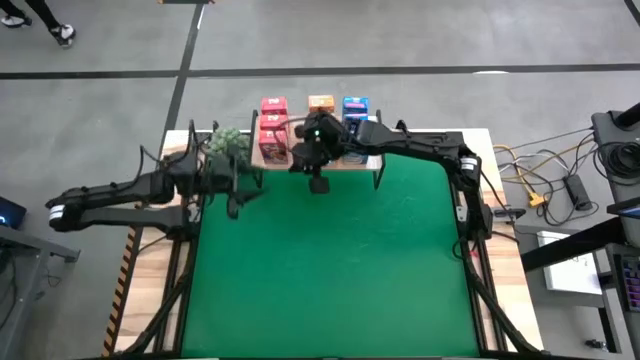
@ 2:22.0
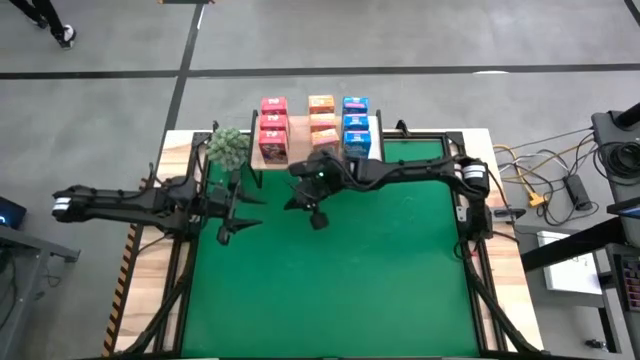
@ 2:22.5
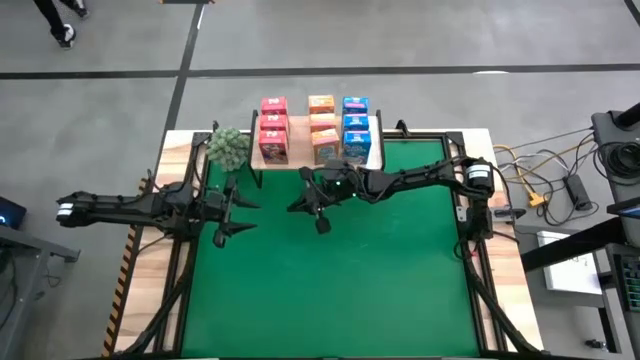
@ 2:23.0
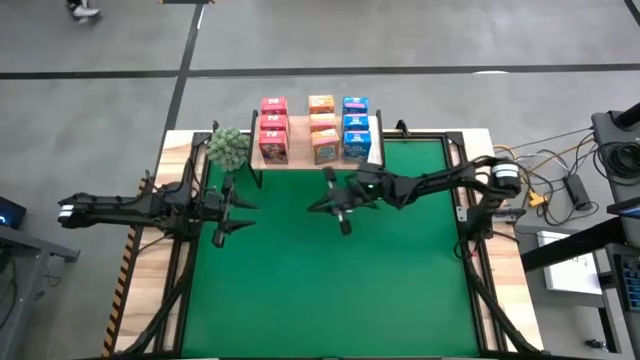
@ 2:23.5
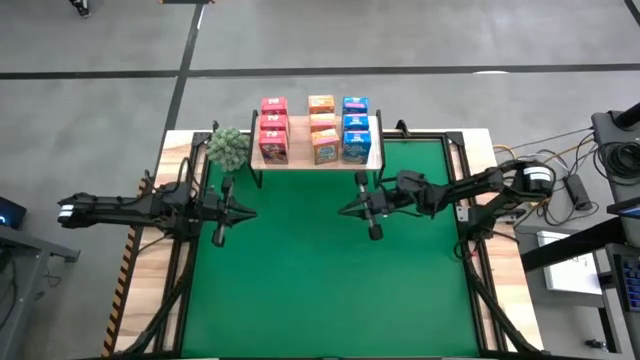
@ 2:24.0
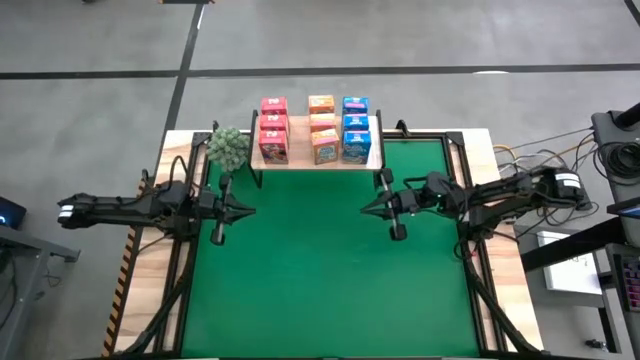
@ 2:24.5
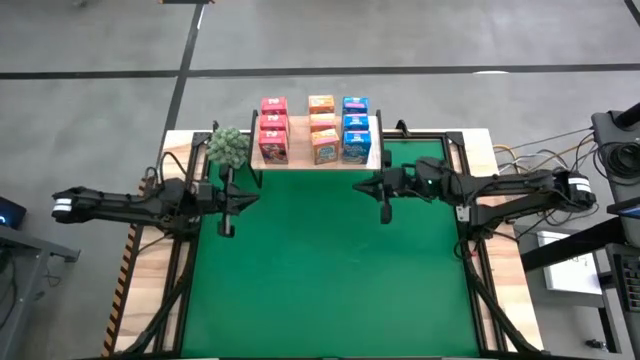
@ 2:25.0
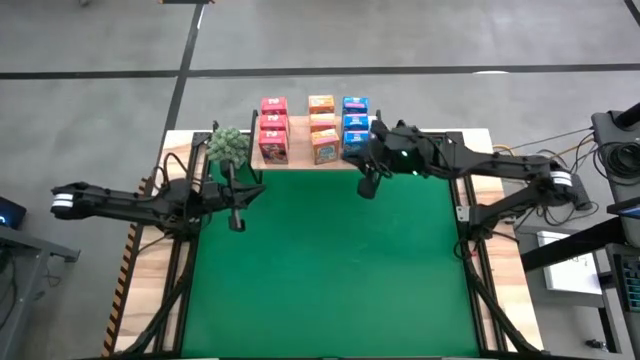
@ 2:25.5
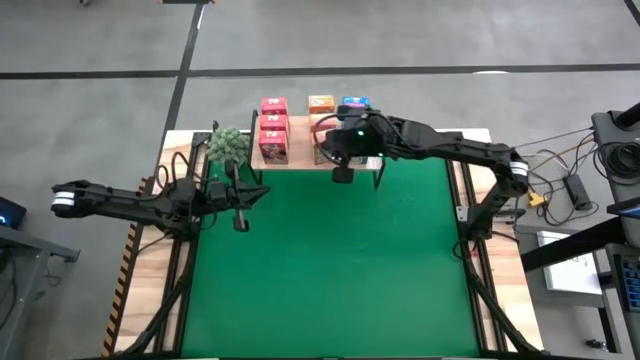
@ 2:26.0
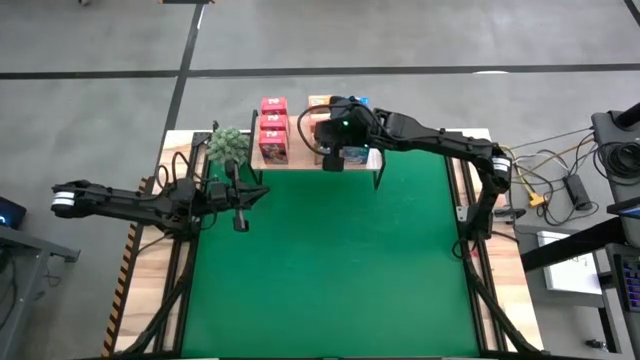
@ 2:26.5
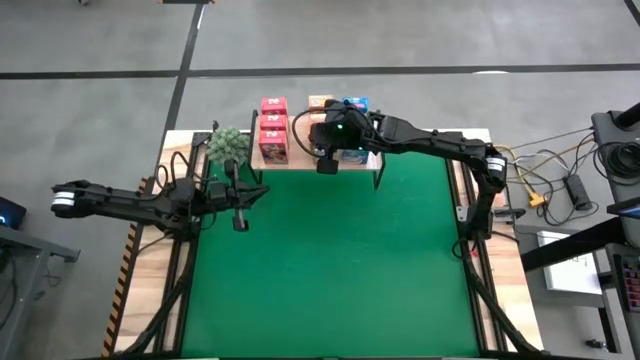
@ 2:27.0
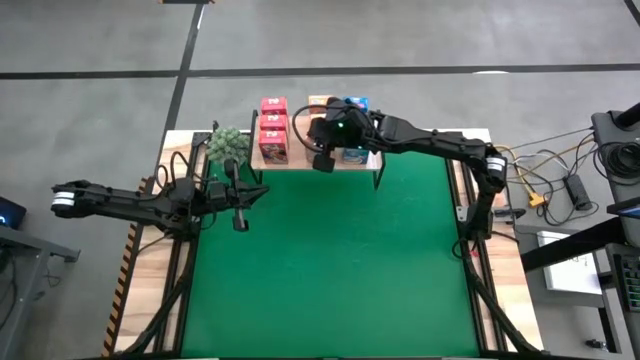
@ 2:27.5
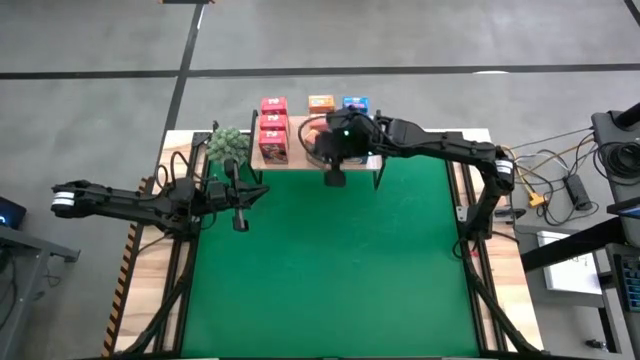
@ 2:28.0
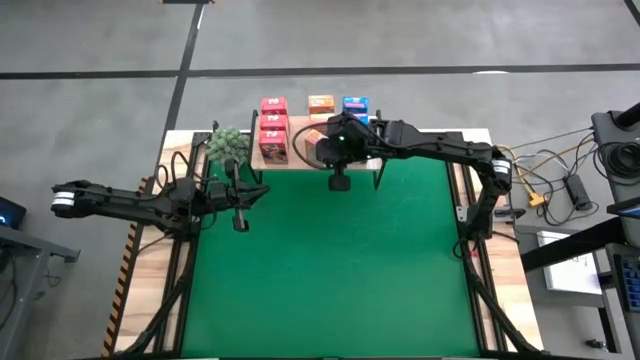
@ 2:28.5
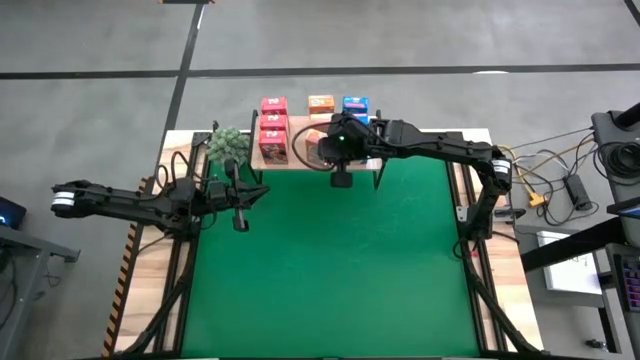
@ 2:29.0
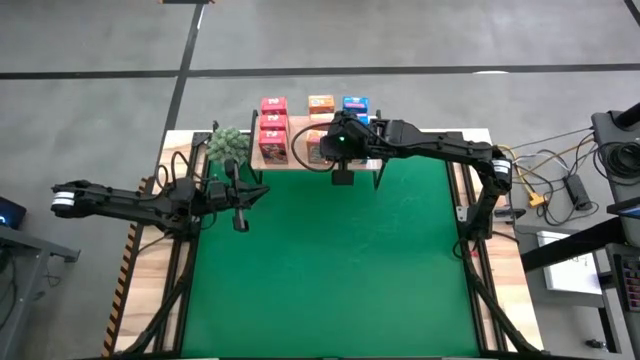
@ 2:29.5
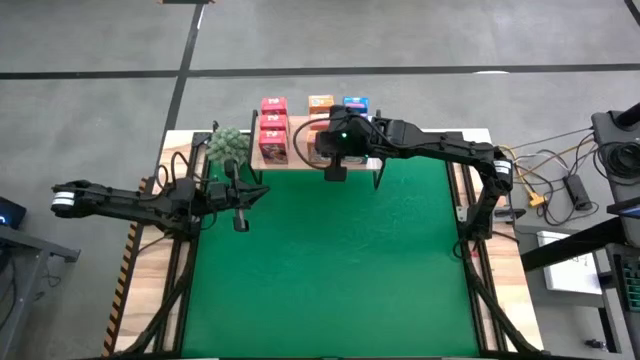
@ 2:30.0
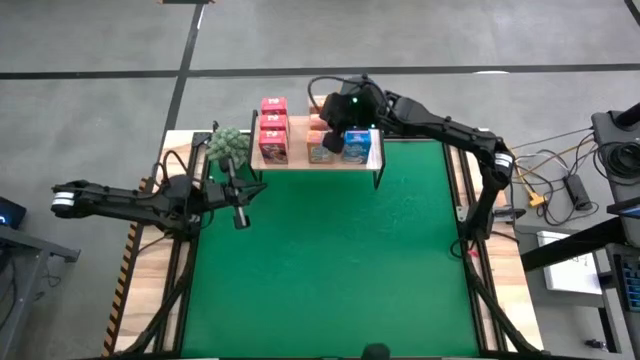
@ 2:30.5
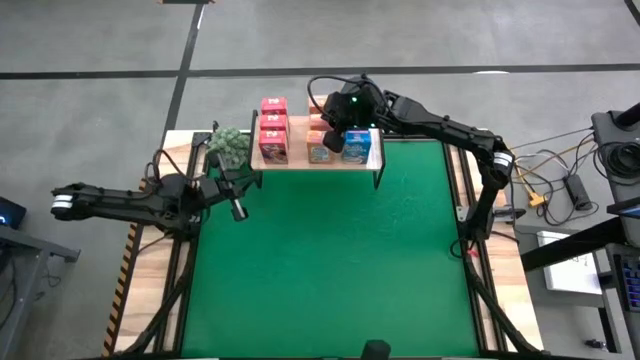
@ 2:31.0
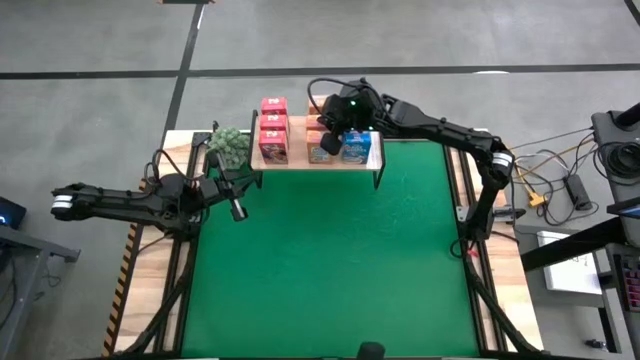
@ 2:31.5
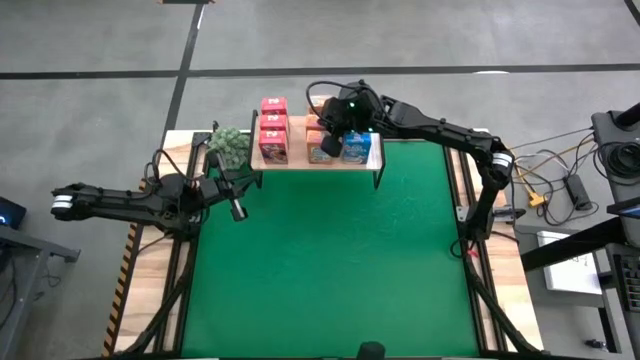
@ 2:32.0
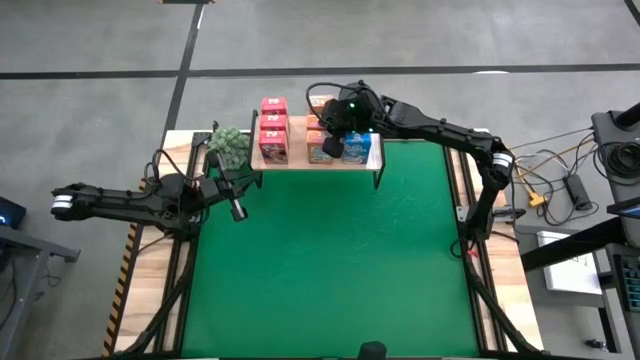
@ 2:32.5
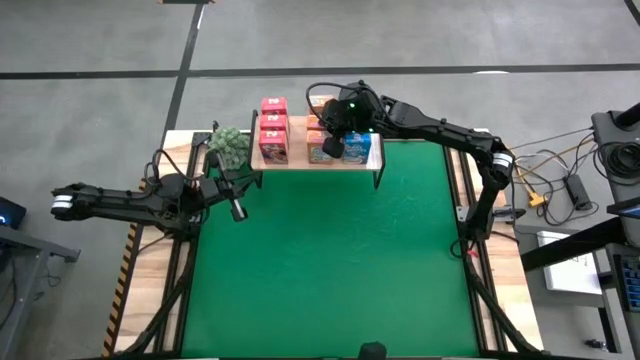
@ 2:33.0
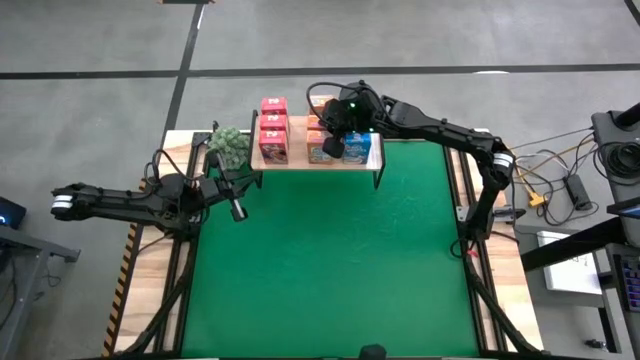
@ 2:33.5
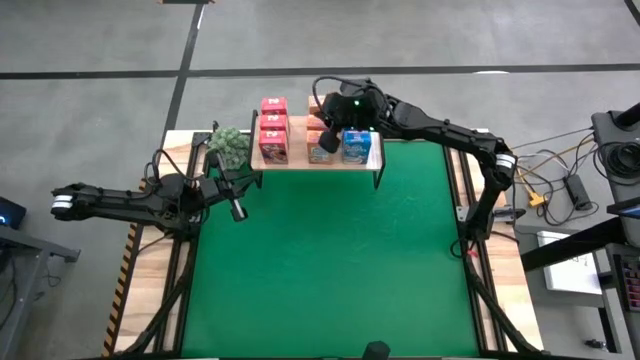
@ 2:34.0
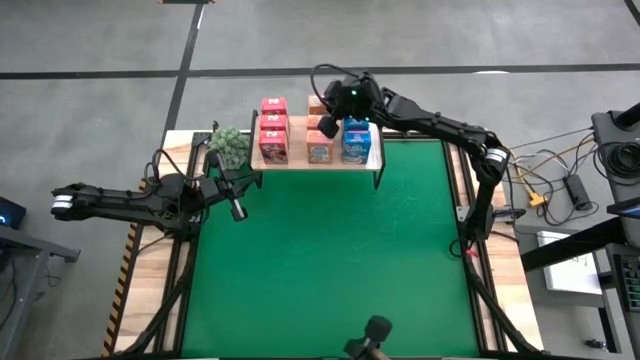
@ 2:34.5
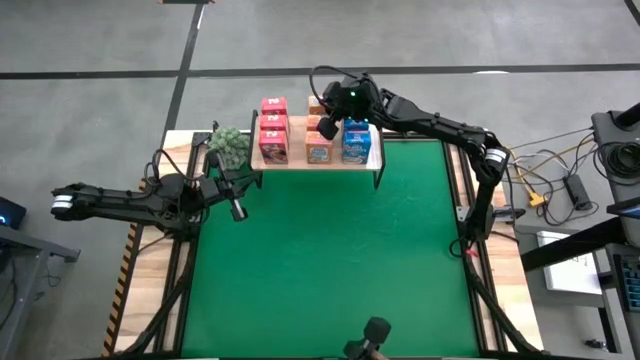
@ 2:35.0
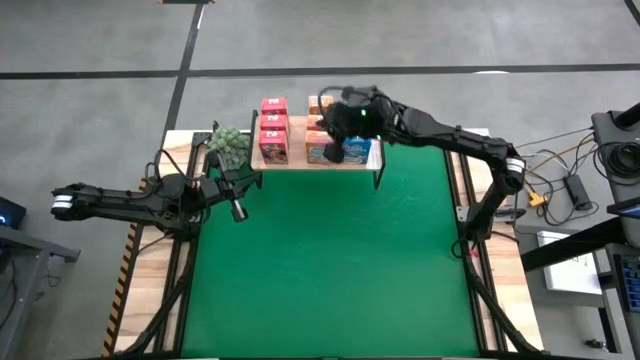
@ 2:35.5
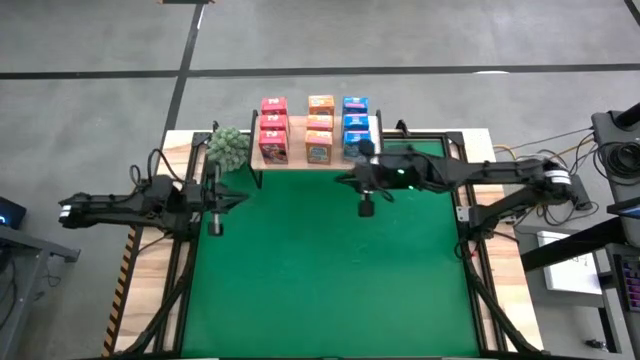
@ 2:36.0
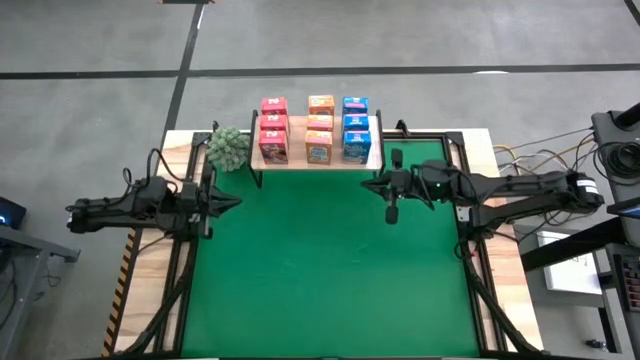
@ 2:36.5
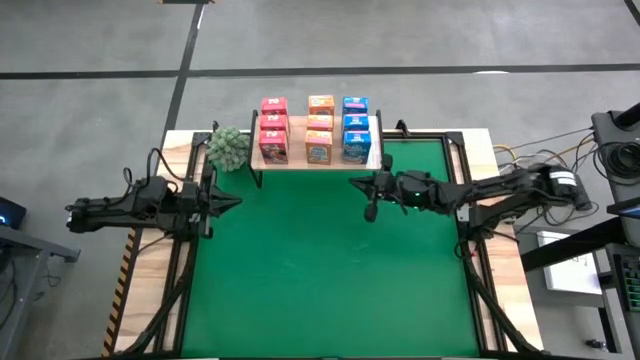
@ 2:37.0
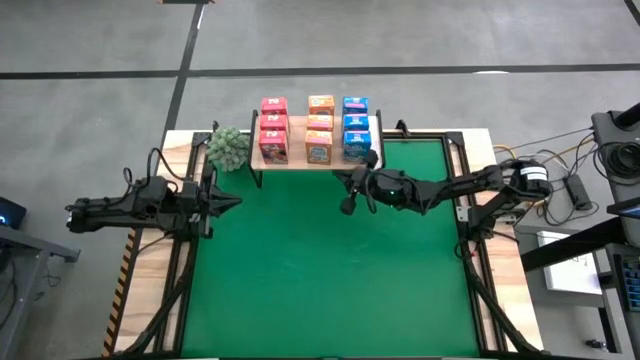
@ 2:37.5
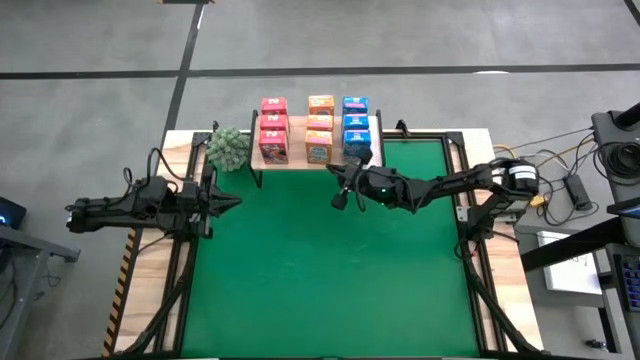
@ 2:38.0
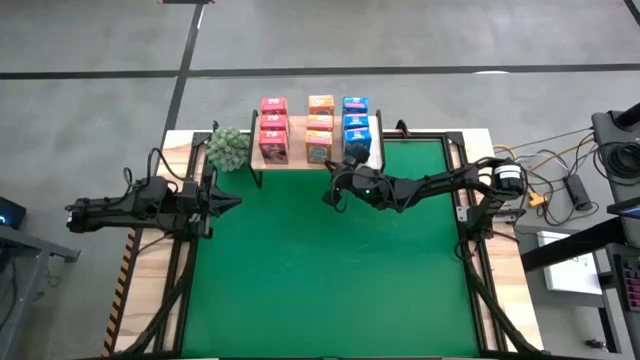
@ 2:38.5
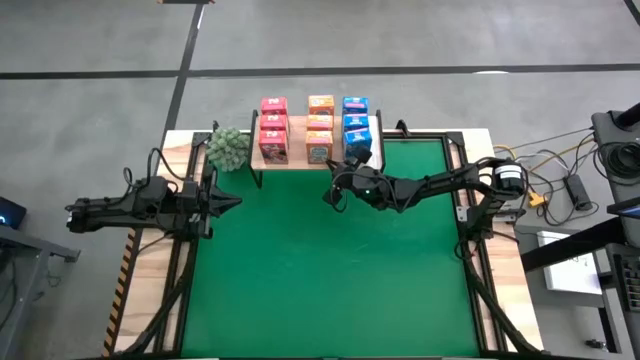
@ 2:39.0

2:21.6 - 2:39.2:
Task: Stack cereal on shelf
Adjust the orange cereal boxes on the shelf

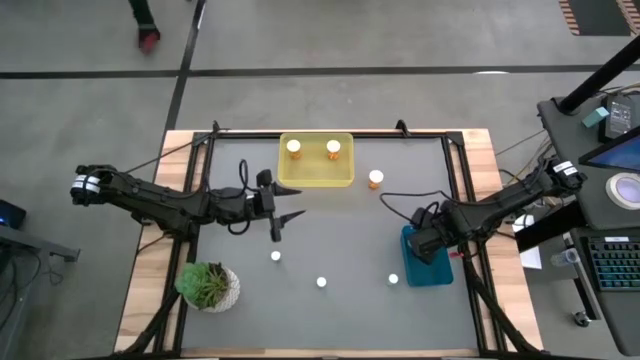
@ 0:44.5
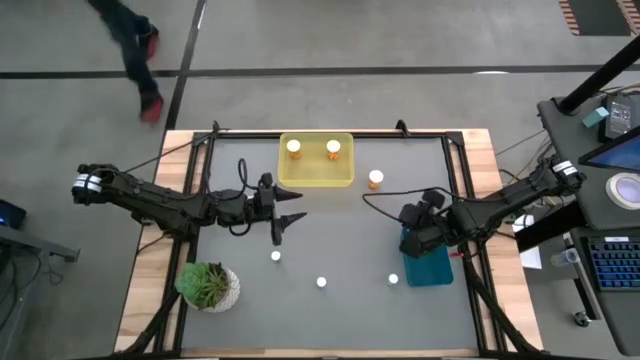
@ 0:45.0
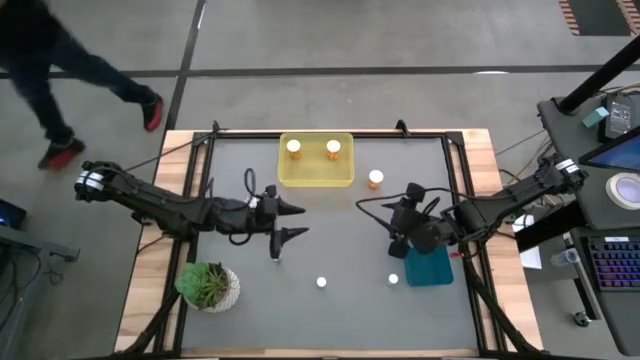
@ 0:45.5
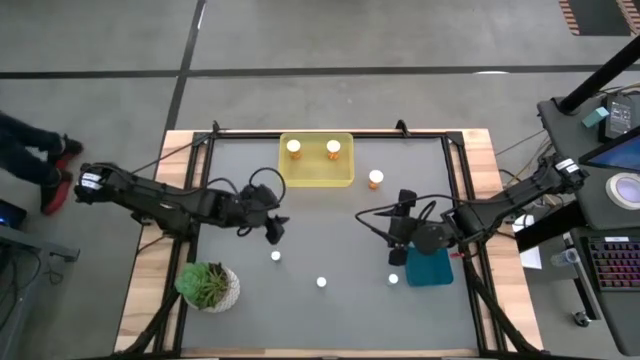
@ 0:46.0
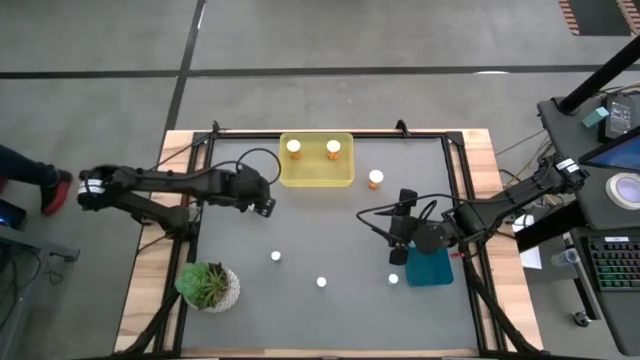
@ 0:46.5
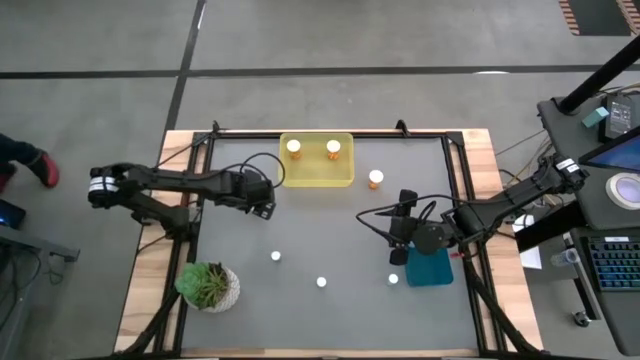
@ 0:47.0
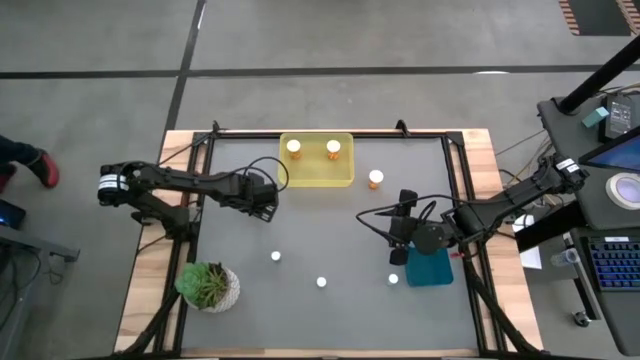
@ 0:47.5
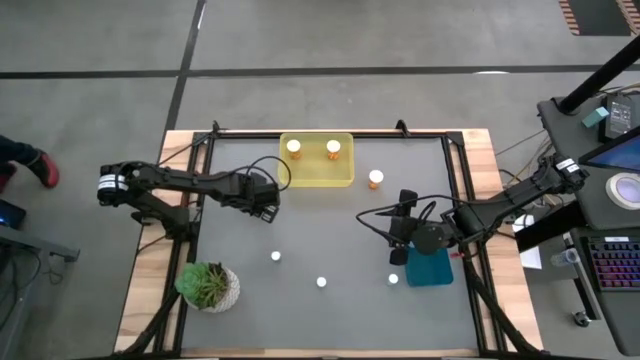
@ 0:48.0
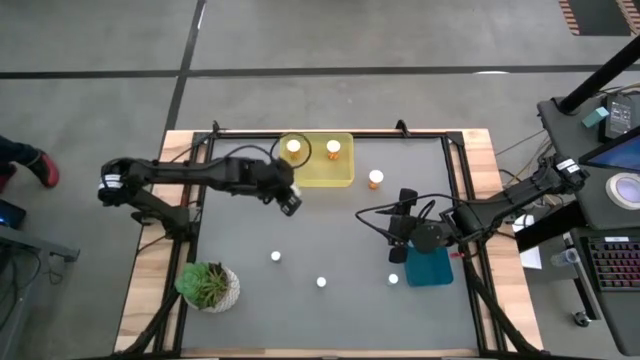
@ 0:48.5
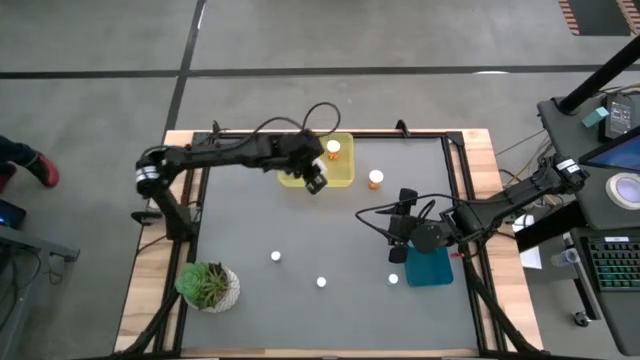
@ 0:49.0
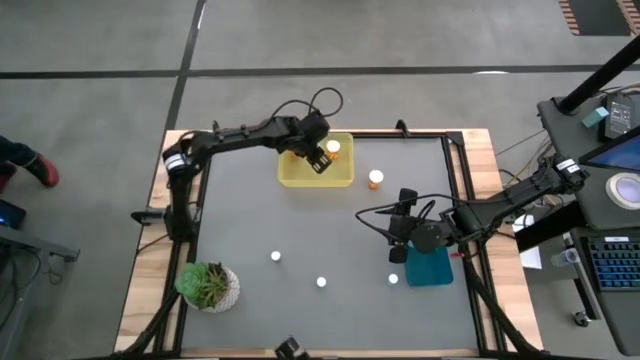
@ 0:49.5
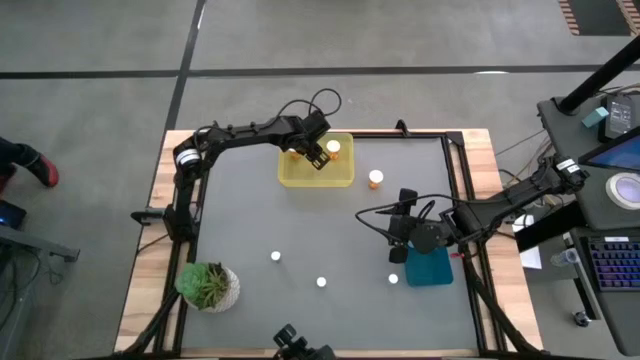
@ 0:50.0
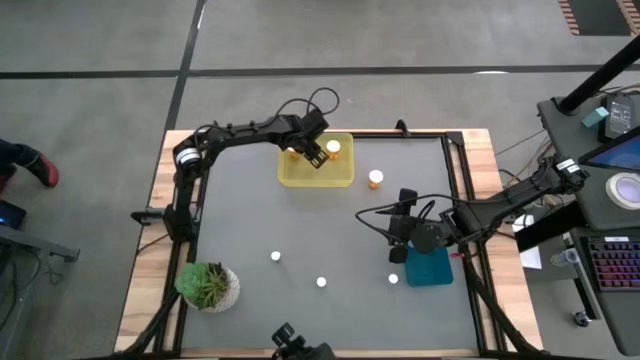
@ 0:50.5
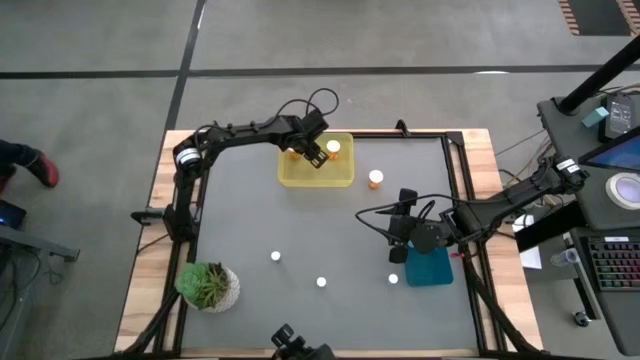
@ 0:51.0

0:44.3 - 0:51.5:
Task: Pick and place medicine bottles into bin by pill shape (circle, oval)
Put the white pill bottle into the yellow bin
